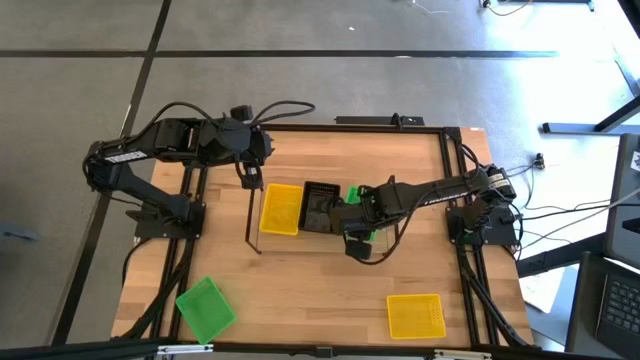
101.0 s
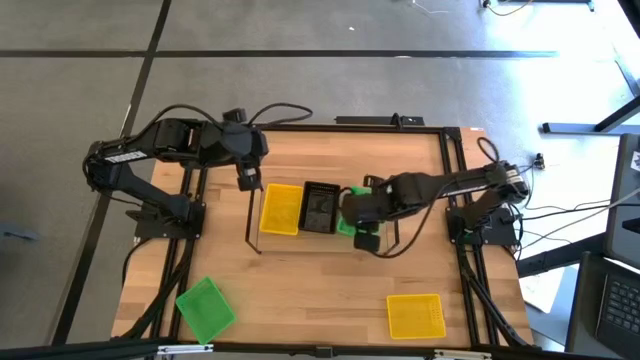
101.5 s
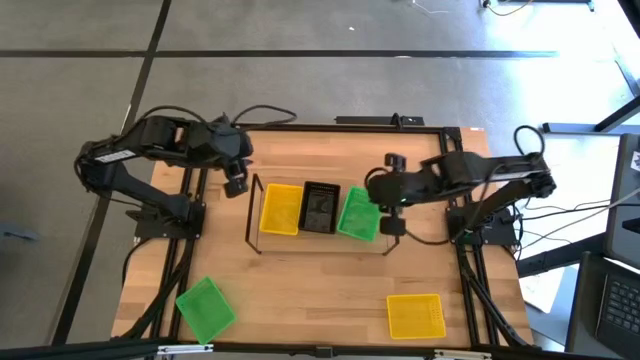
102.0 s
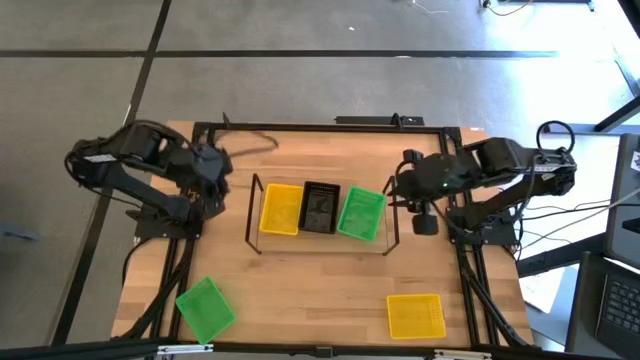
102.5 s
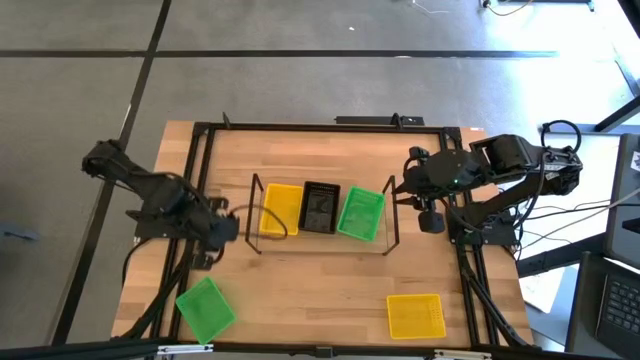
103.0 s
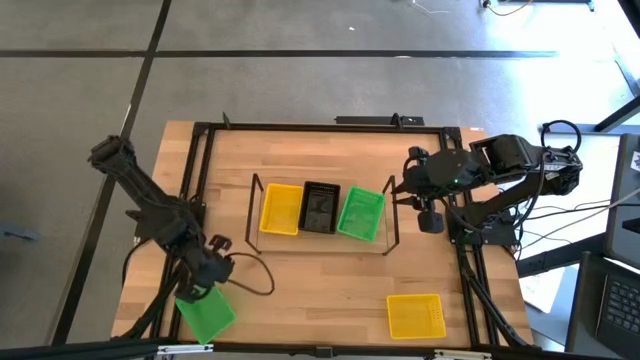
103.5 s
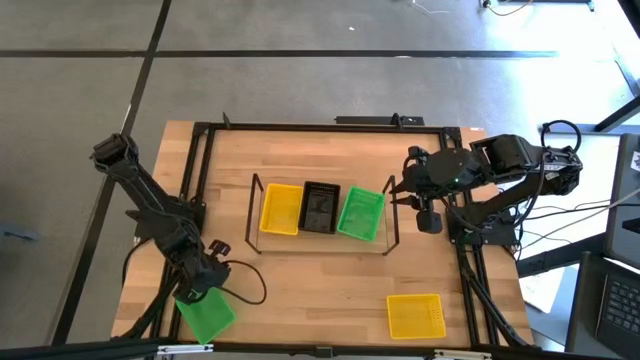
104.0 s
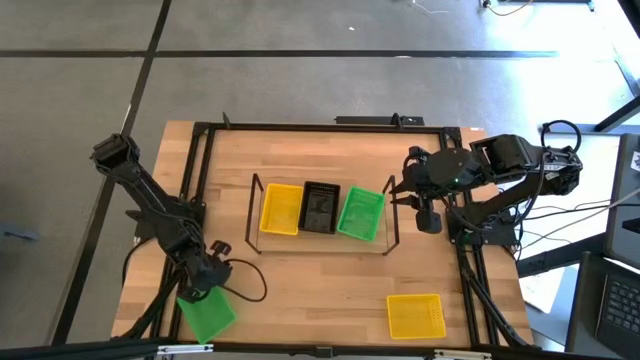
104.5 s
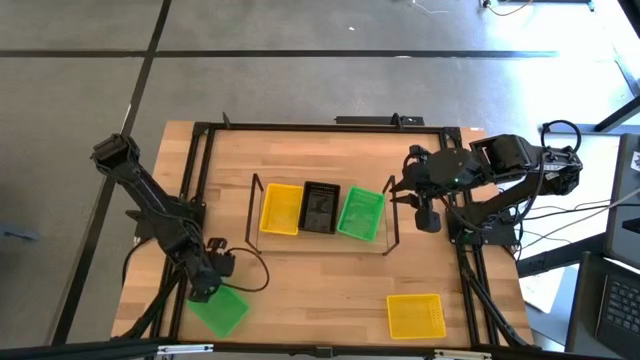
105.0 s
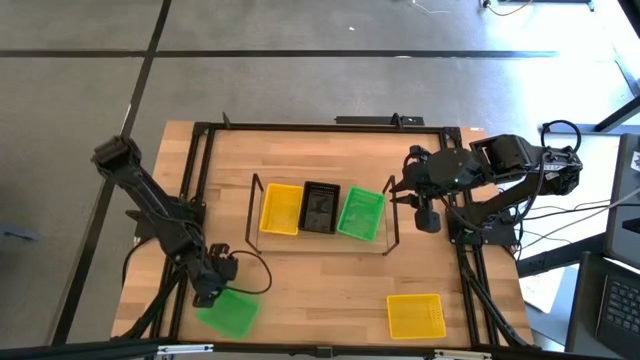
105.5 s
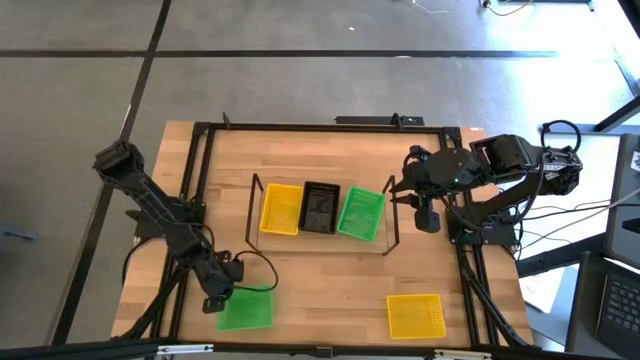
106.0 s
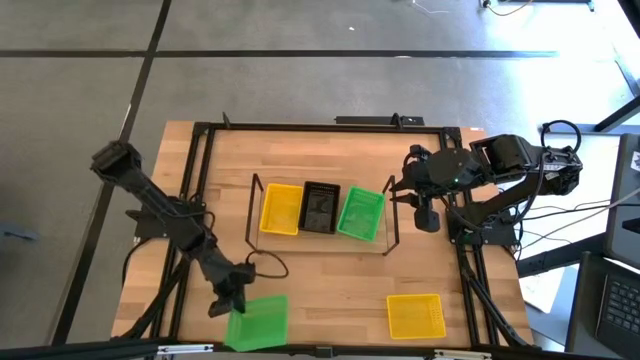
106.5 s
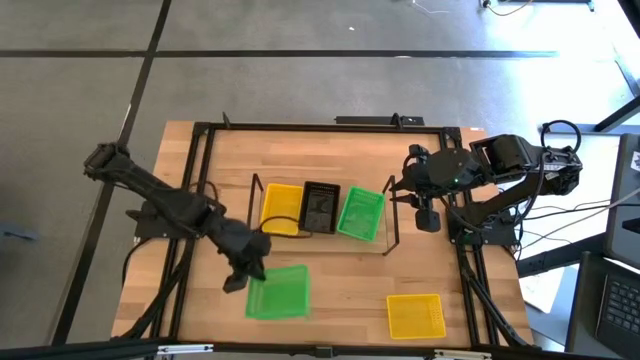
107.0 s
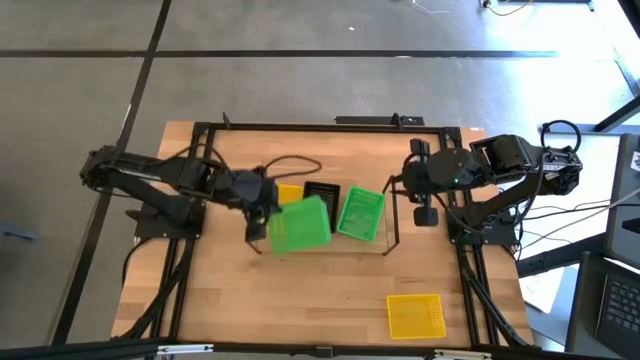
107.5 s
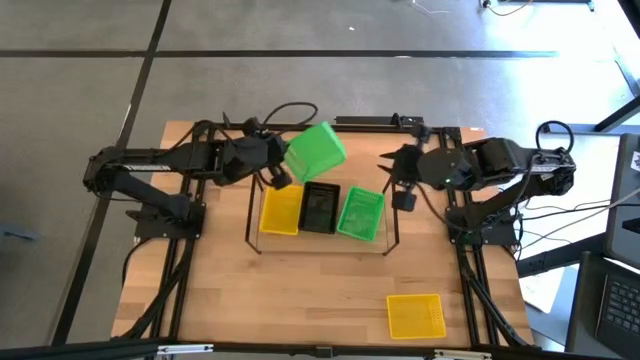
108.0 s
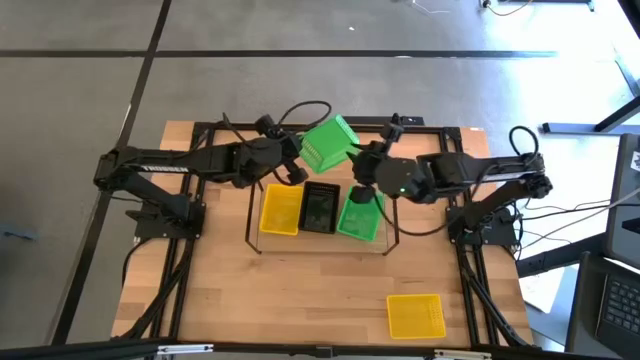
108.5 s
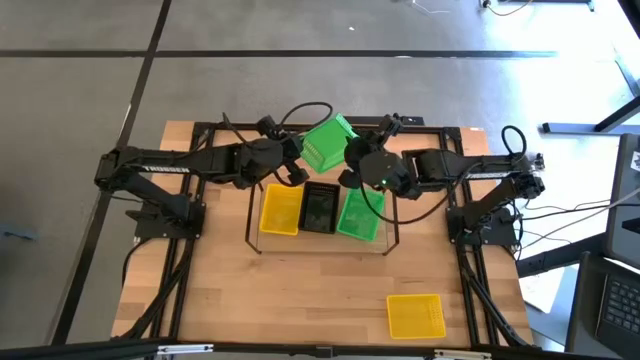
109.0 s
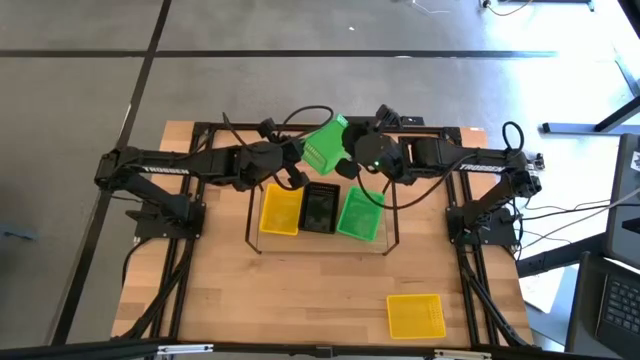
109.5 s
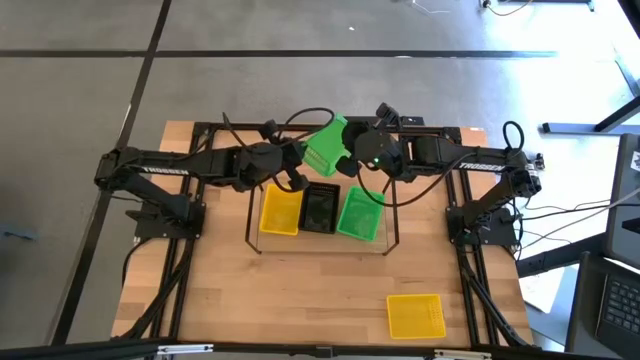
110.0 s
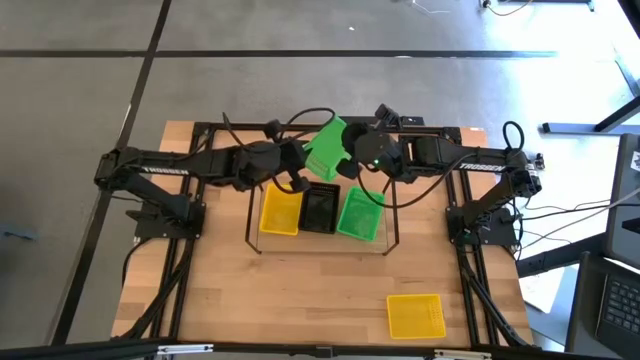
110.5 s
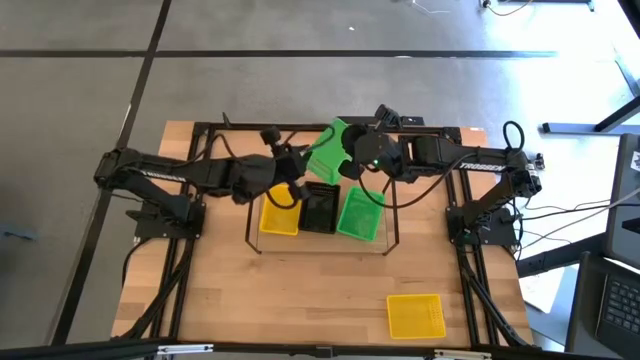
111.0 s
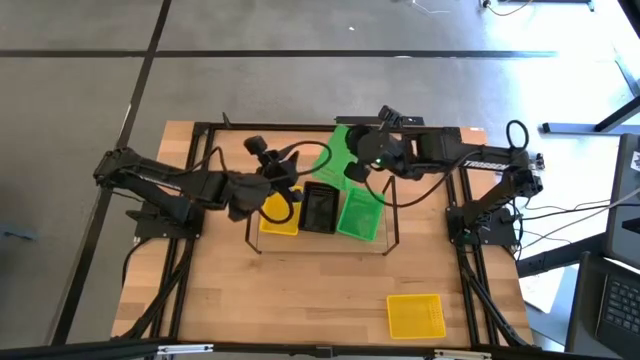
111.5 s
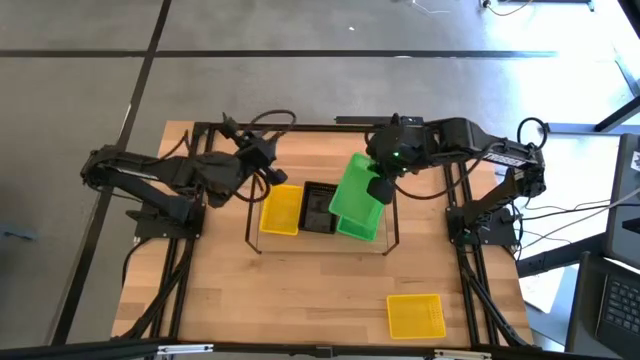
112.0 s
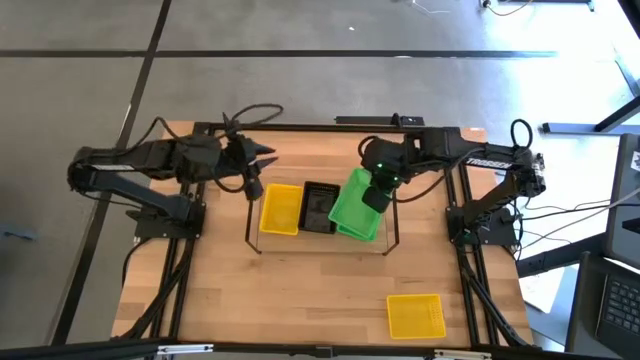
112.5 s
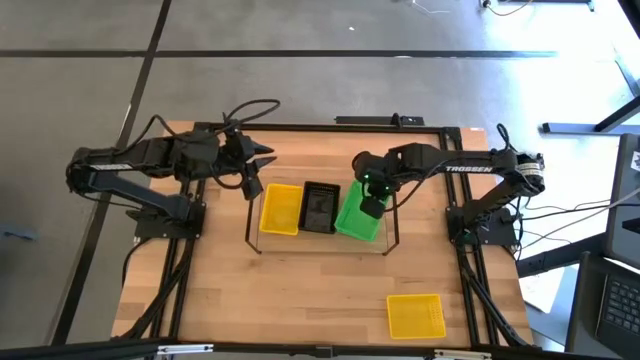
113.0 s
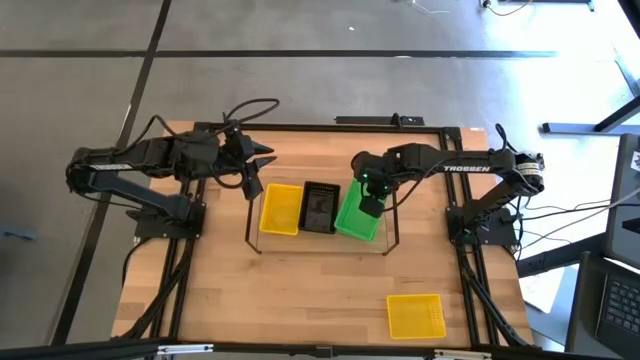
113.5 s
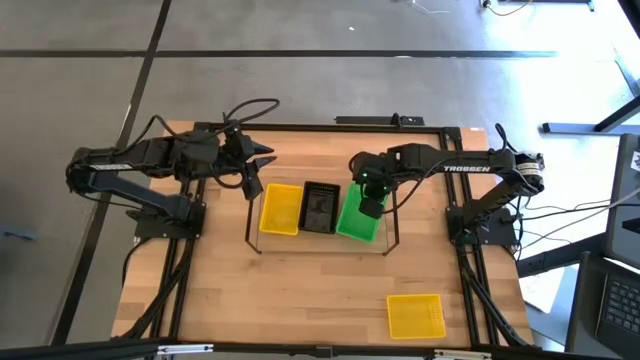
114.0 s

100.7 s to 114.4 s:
Task: Stack baskets on shelf by color
Stack the green bin on top of the green bin on the shelf

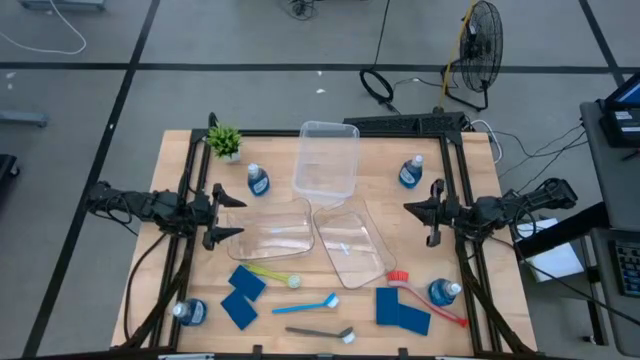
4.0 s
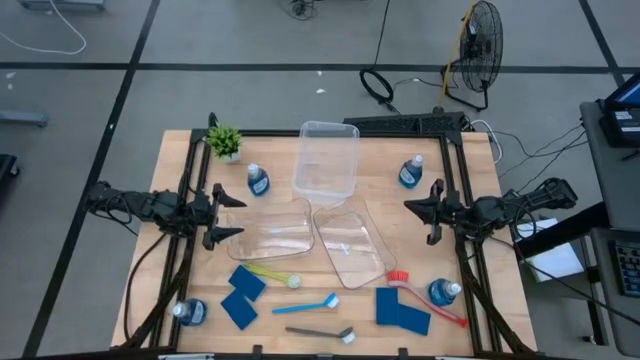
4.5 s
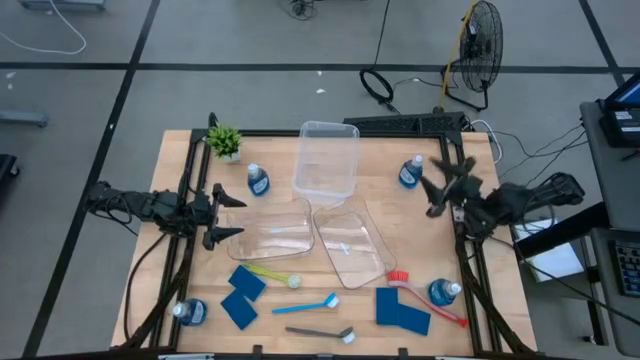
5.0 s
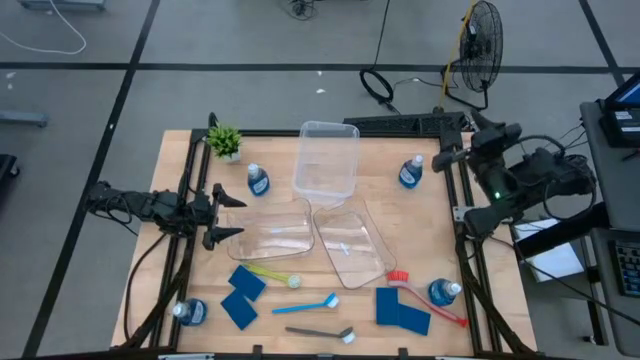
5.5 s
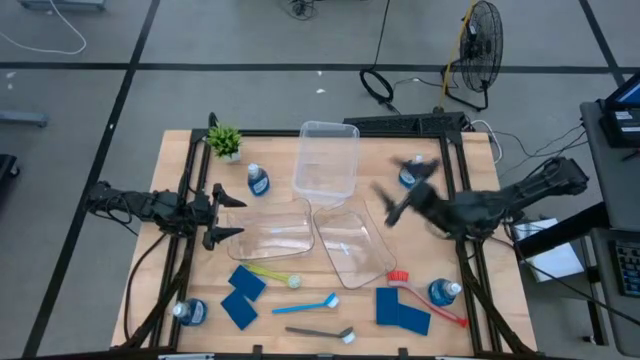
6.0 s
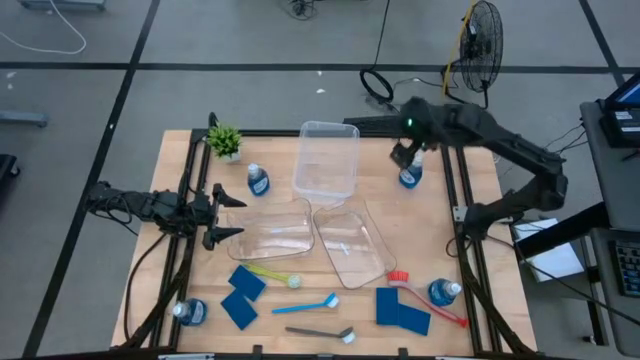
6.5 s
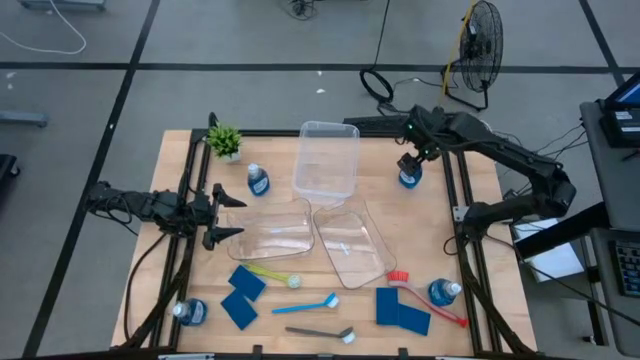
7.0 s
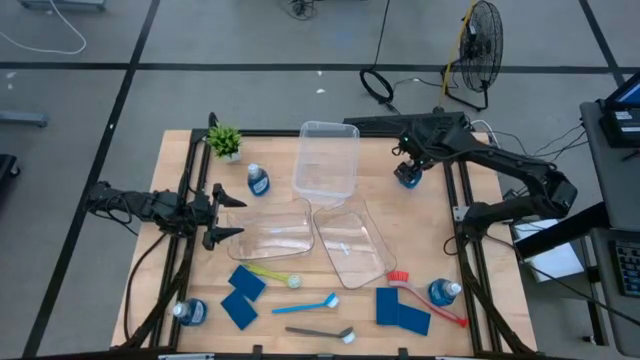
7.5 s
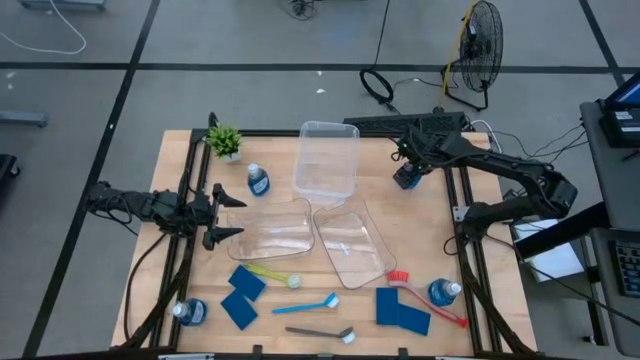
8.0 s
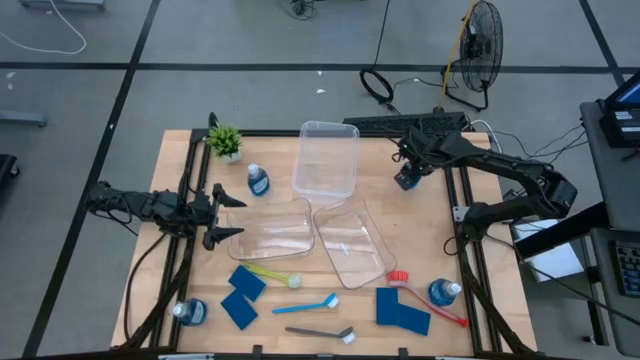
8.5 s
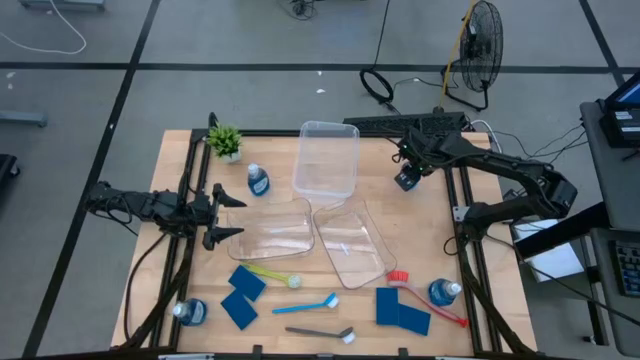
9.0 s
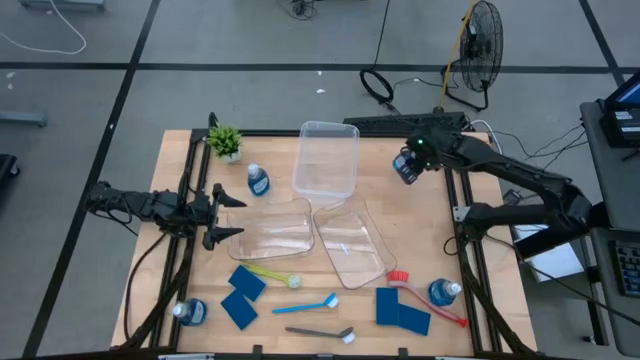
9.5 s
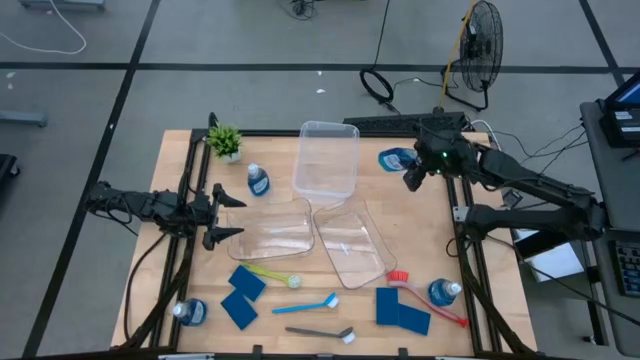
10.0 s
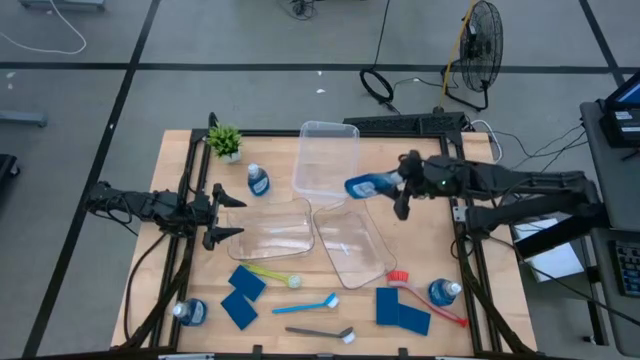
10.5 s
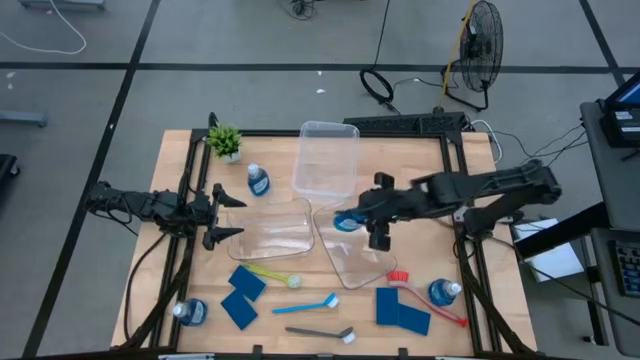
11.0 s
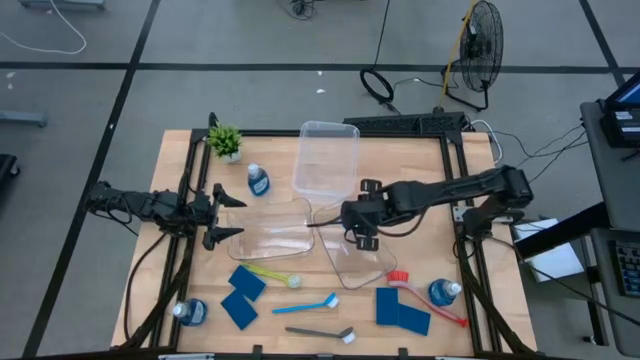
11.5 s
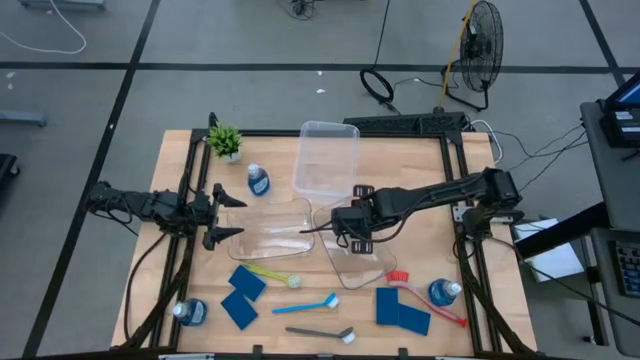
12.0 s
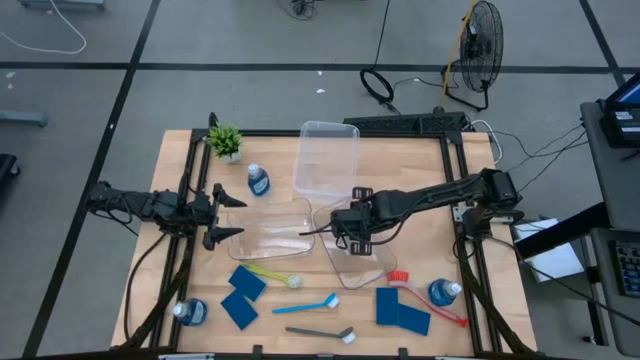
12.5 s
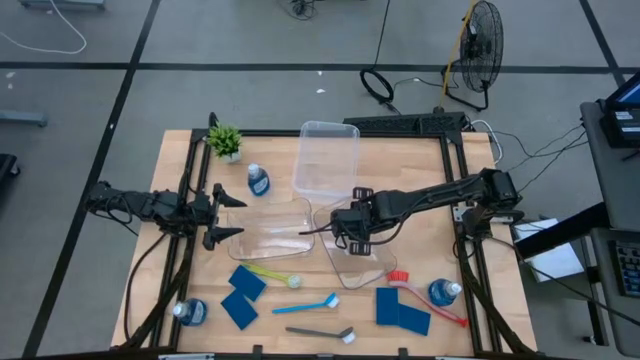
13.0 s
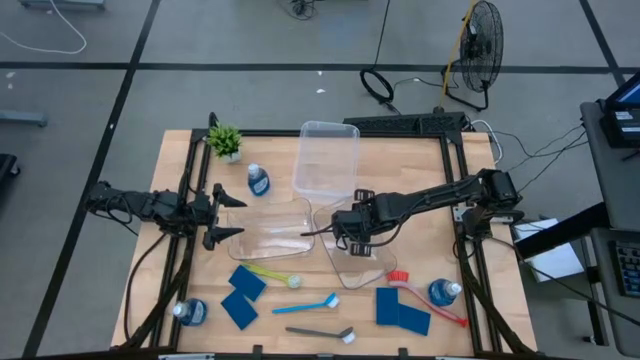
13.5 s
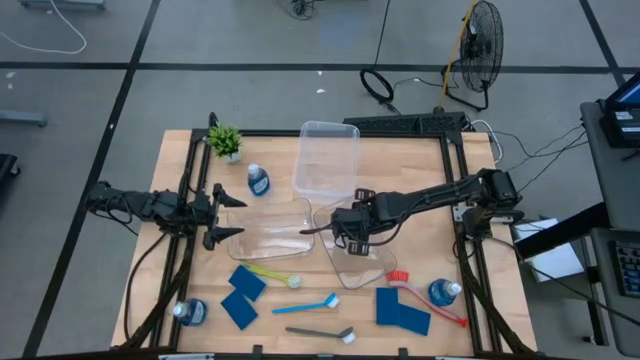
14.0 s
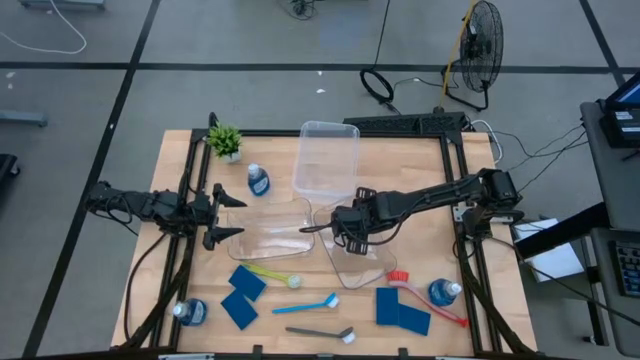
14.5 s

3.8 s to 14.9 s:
Task: Pick & Place Kitchen Sink Supplies
Put the blue soap dispenser into the right transparent bin
